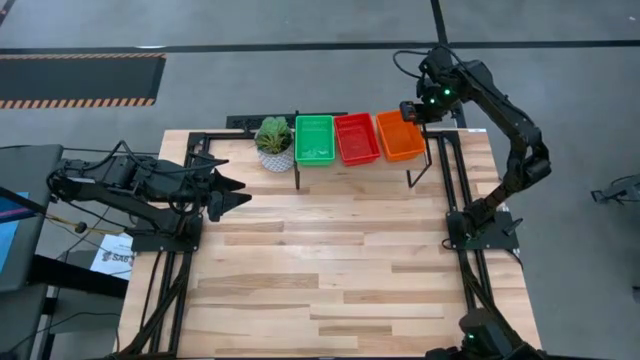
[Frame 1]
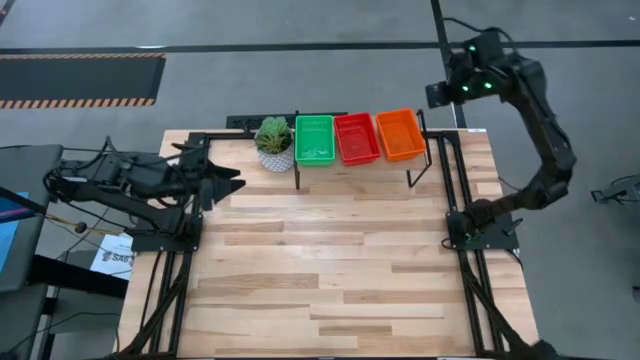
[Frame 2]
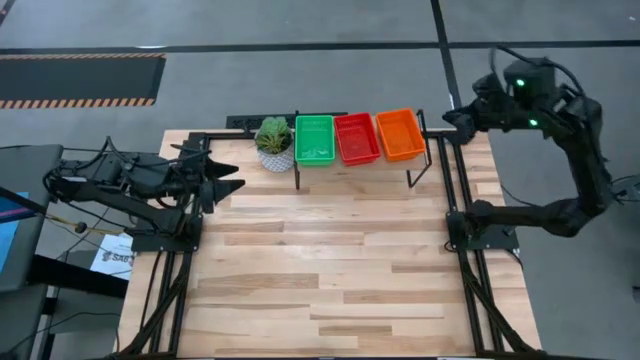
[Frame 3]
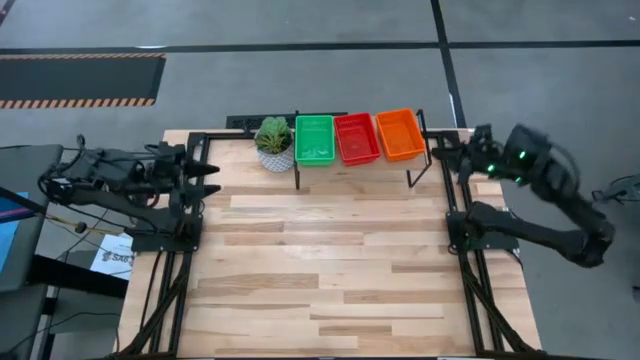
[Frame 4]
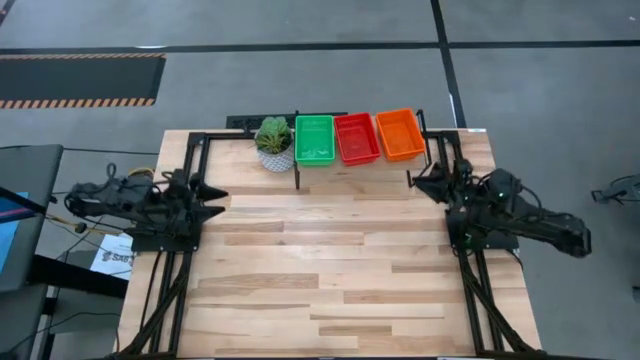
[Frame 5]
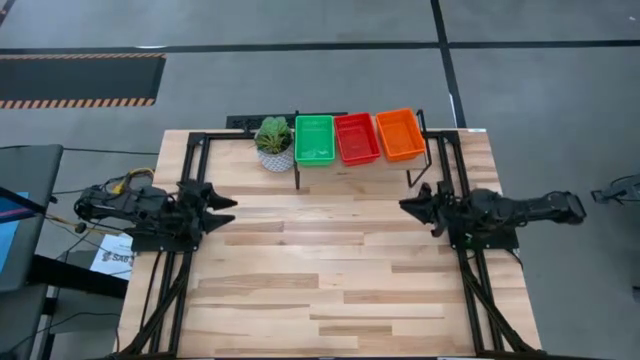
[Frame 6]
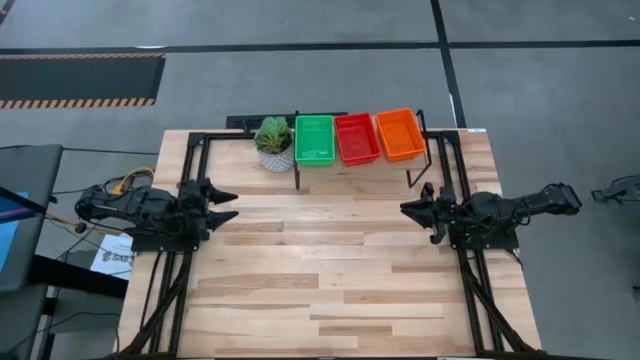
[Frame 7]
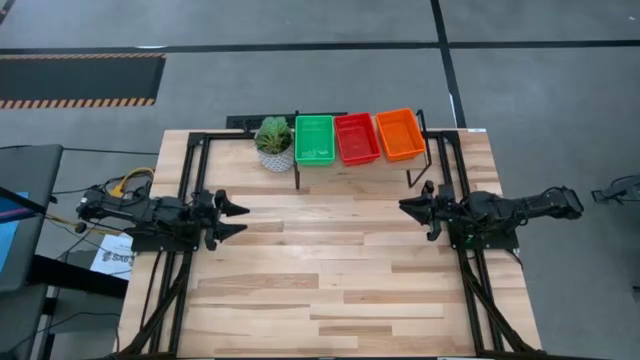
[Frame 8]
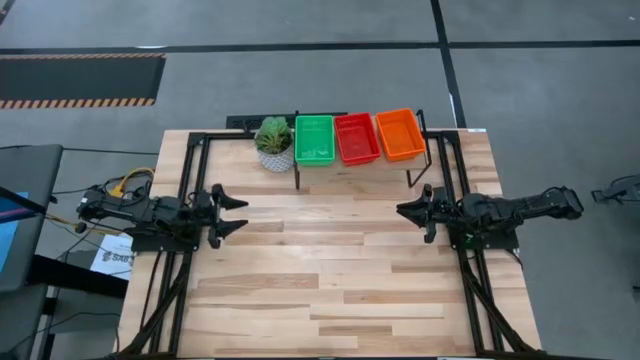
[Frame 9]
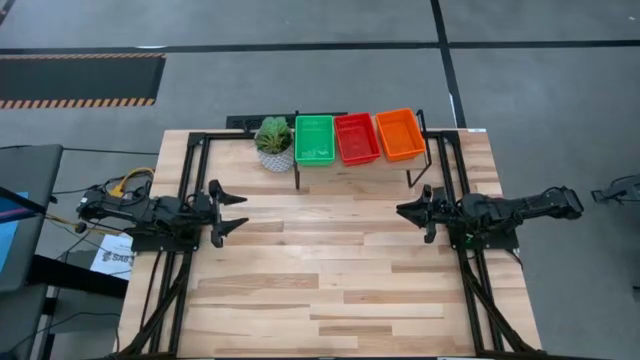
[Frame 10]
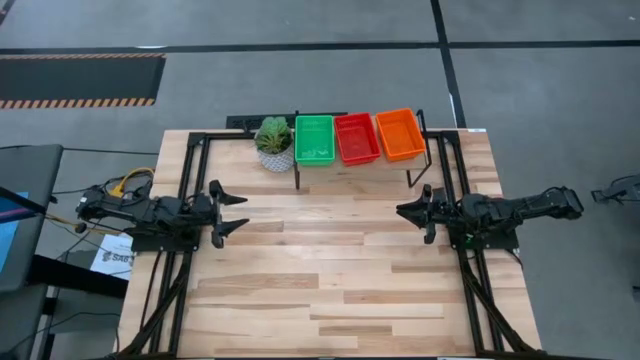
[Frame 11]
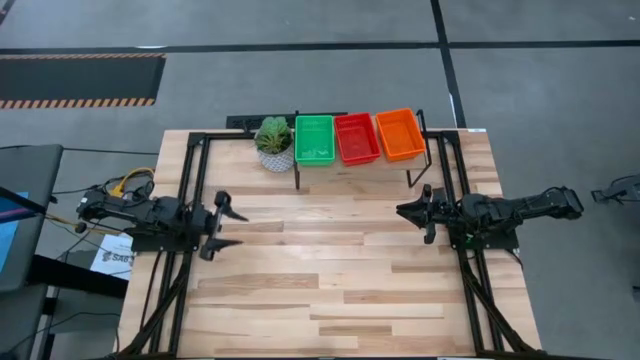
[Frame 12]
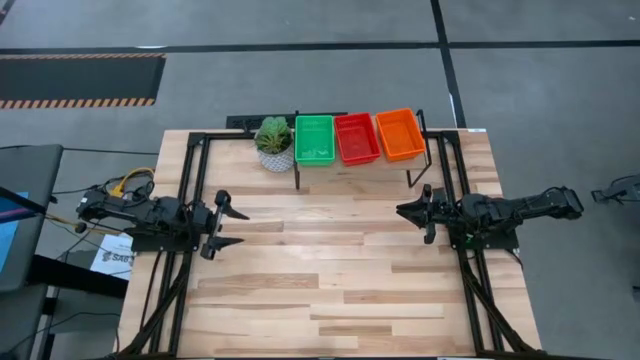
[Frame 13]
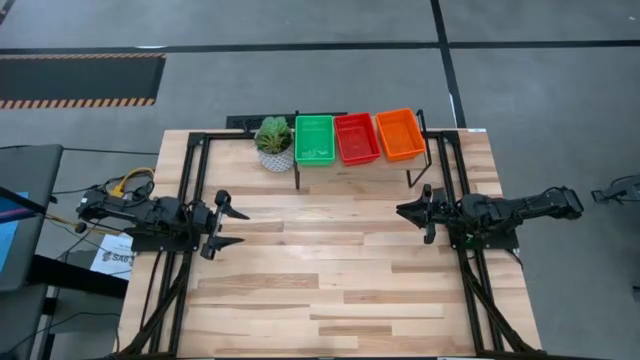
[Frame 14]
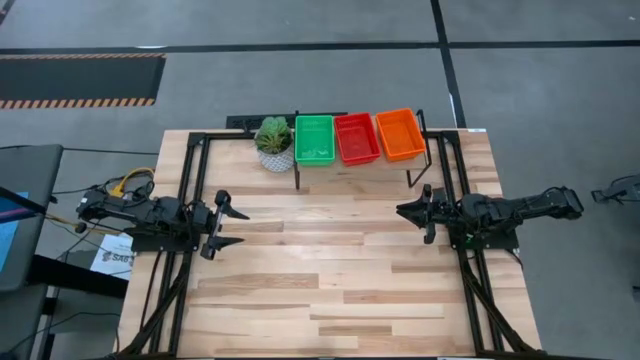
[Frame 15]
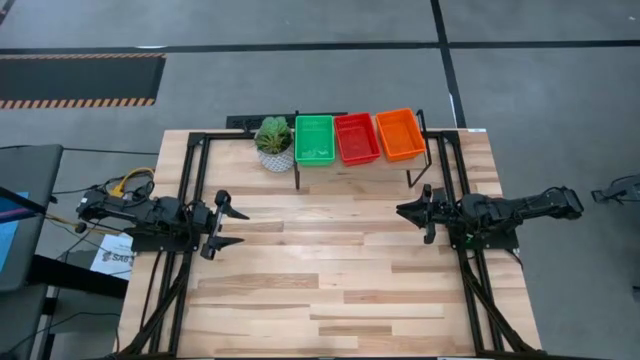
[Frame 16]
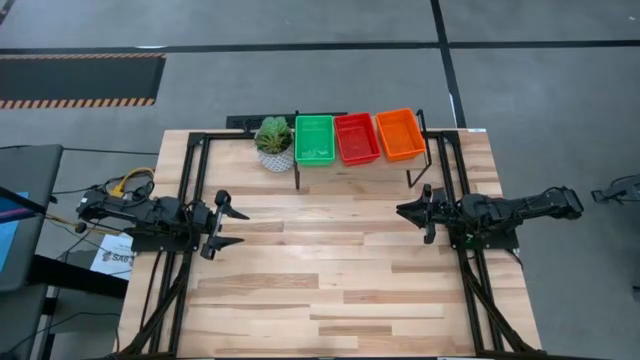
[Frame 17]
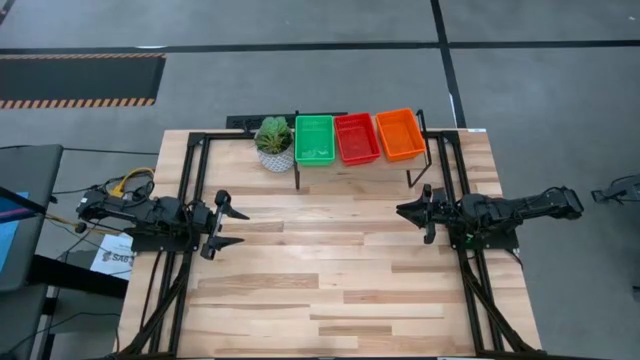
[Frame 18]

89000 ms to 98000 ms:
Task: Stack baskets on shelf by color
Return to Home Position

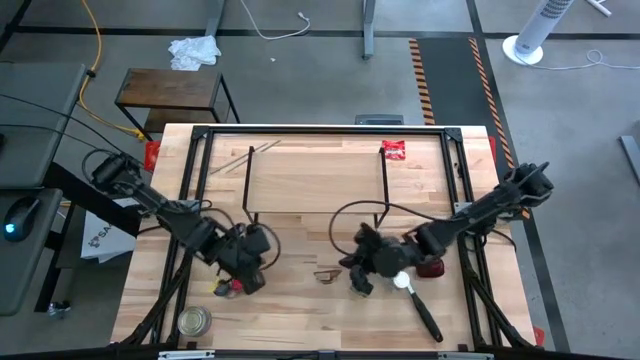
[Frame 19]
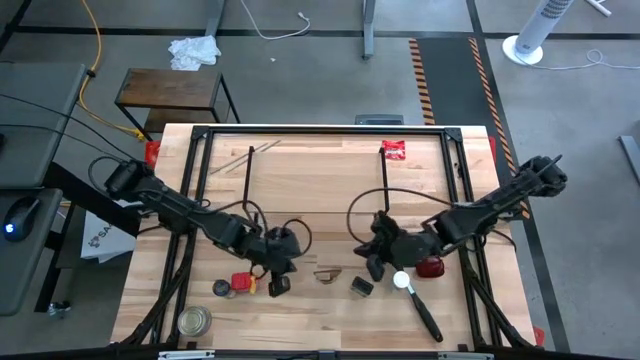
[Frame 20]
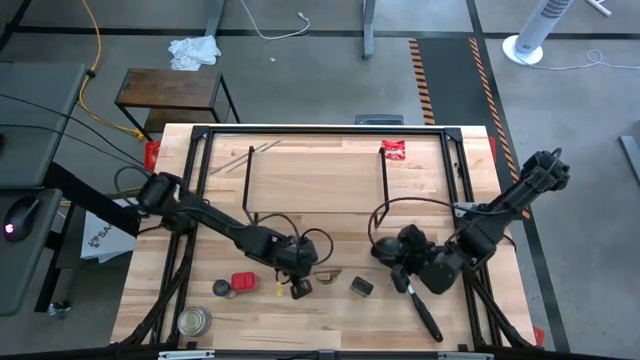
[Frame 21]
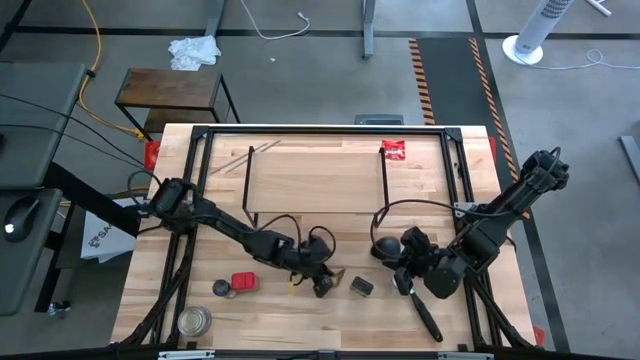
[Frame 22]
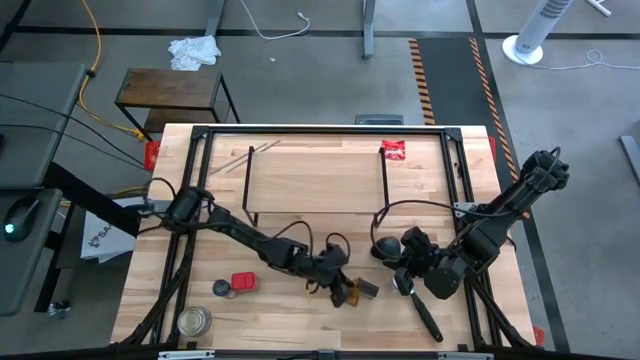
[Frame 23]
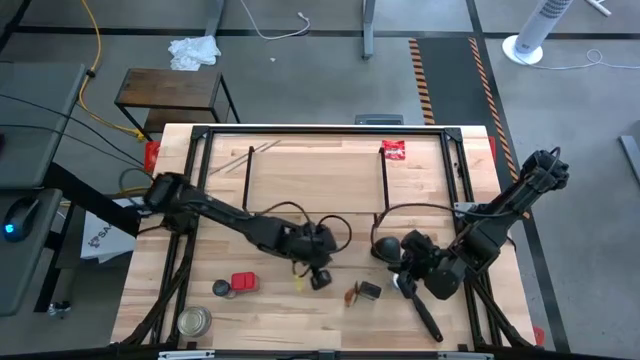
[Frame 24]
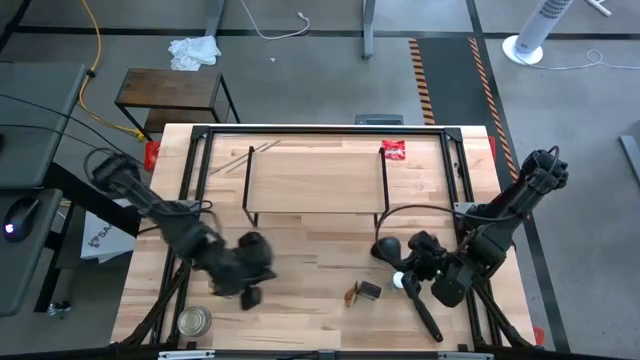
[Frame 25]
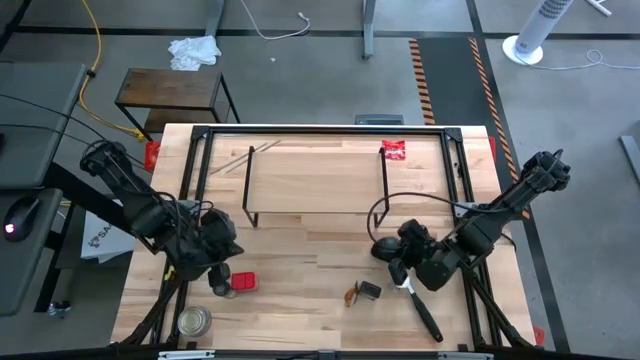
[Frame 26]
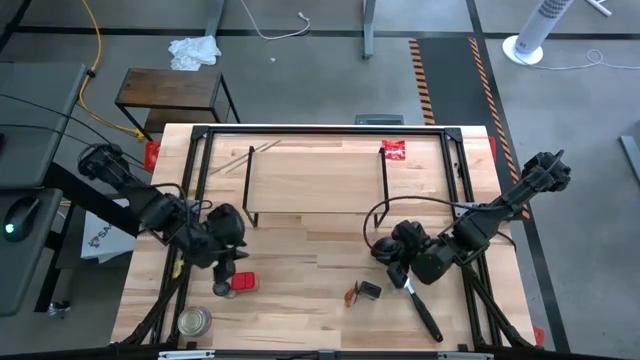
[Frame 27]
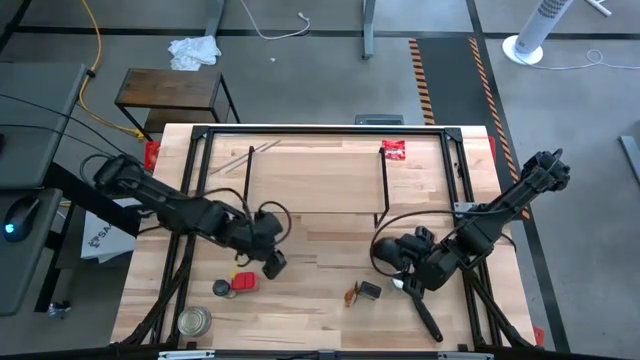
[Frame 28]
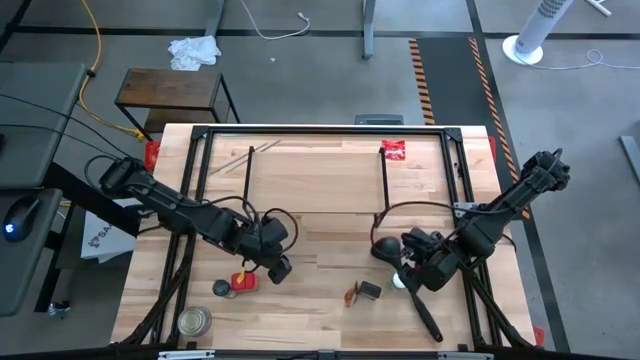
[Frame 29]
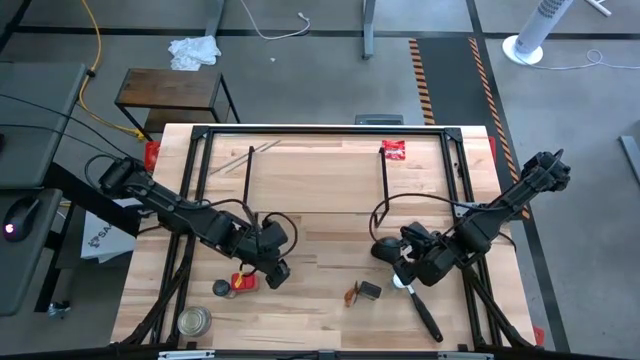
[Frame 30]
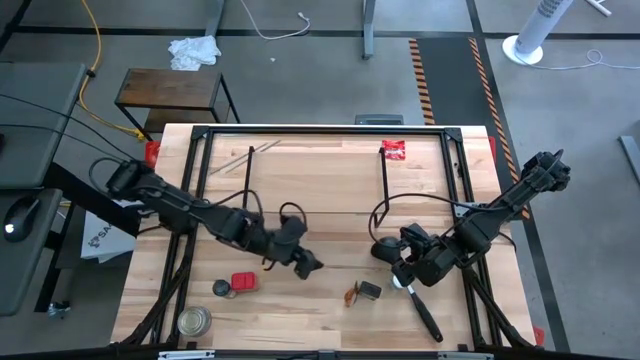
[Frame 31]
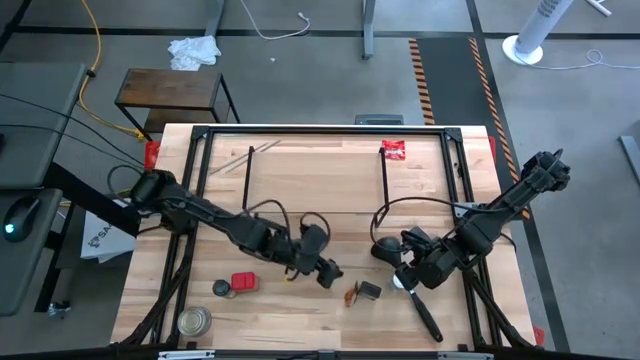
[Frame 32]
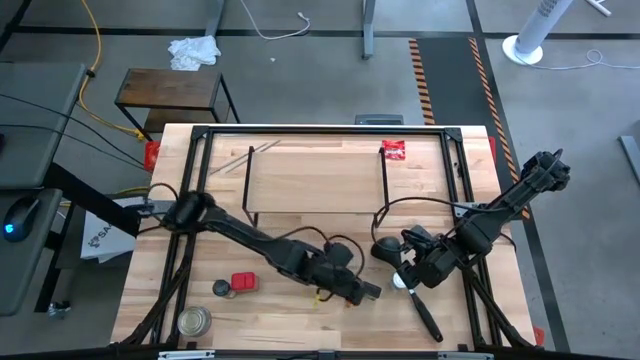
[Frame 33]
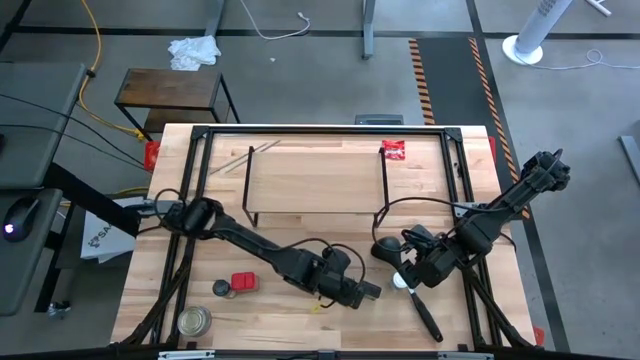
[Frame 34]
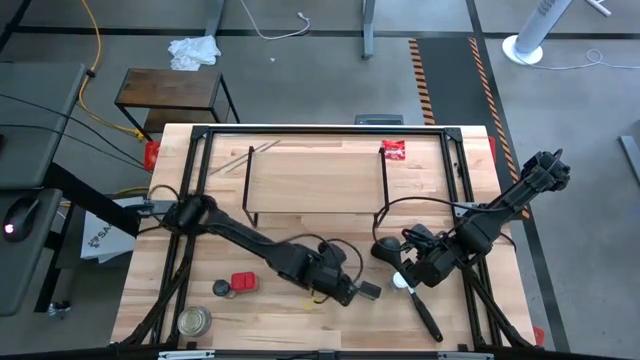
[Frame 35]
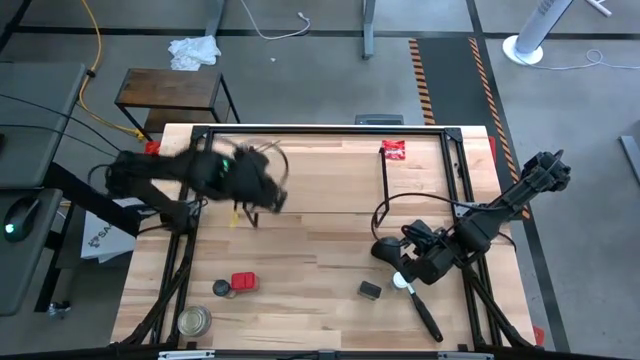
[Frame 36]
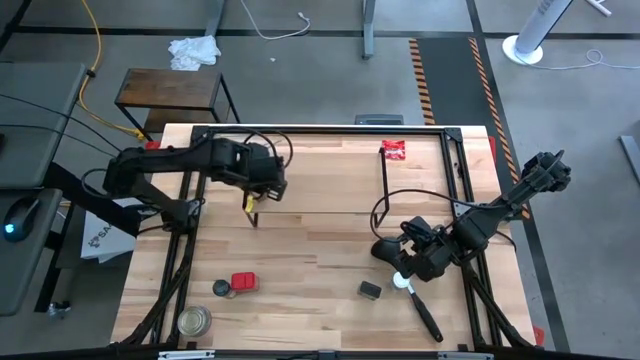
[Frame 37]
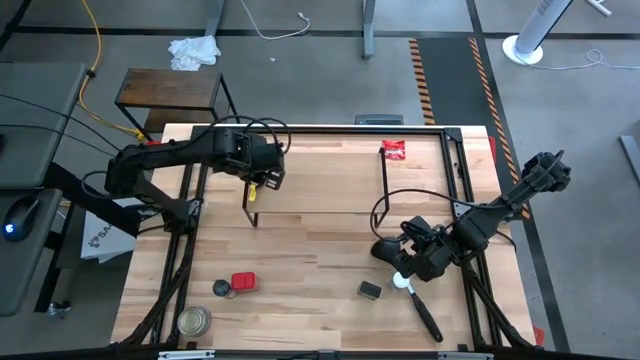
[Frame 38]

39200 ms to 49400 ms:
Task: Shelf spices
Put the orange seasoning pack on the shelf
